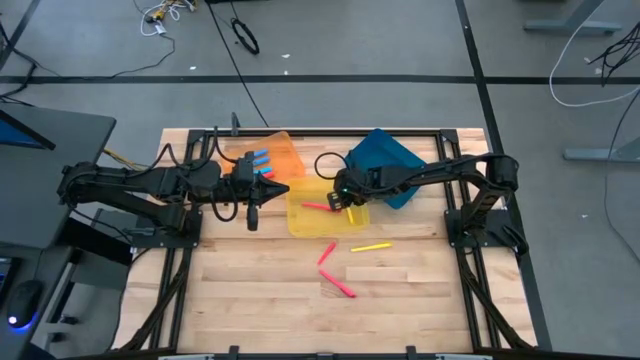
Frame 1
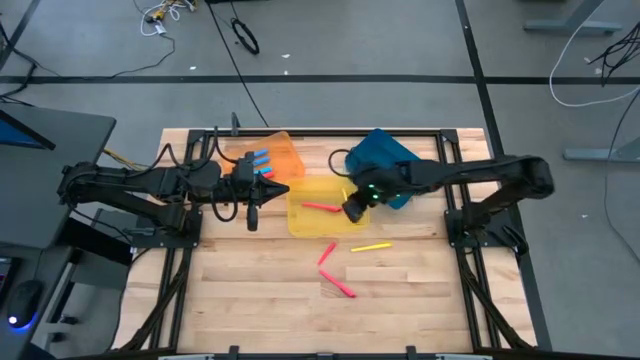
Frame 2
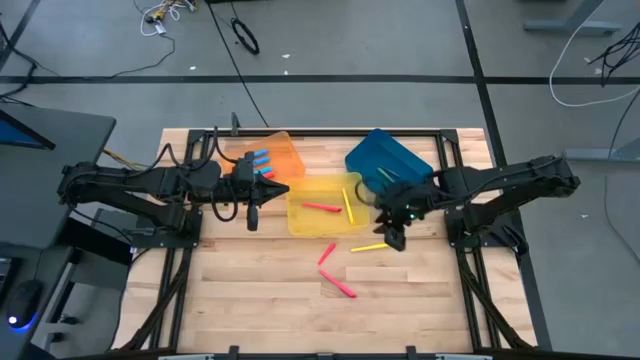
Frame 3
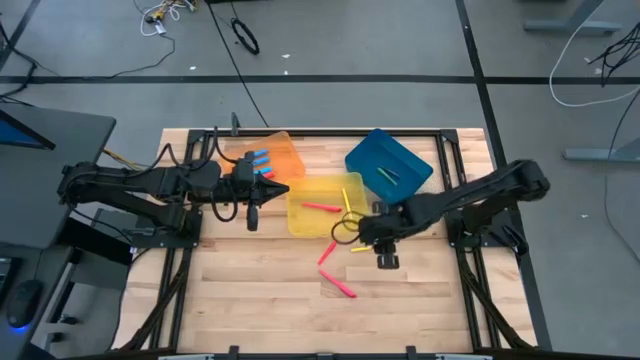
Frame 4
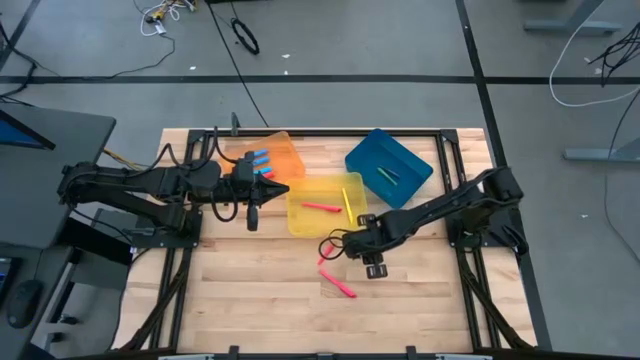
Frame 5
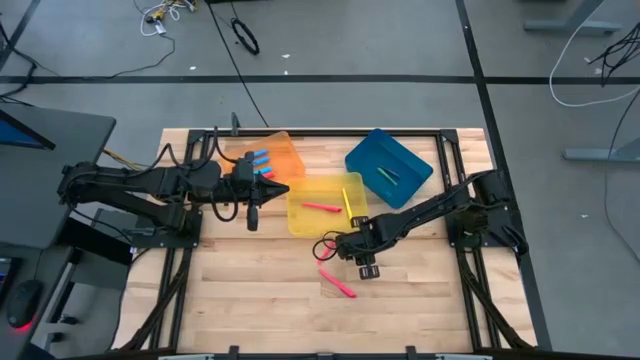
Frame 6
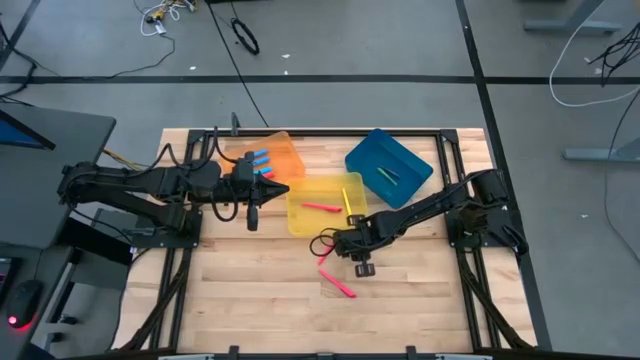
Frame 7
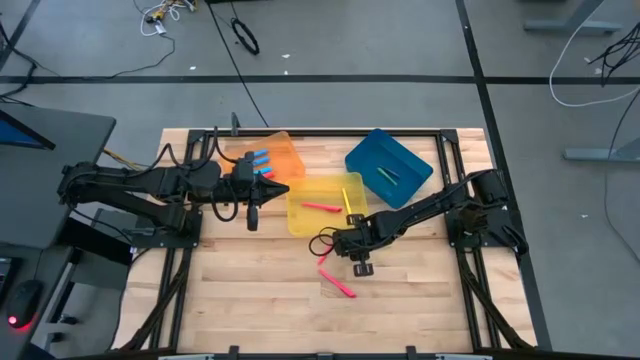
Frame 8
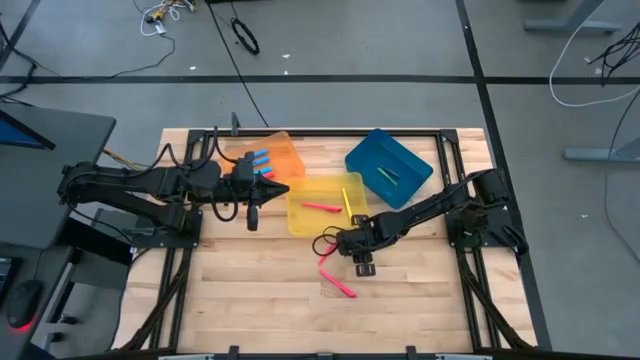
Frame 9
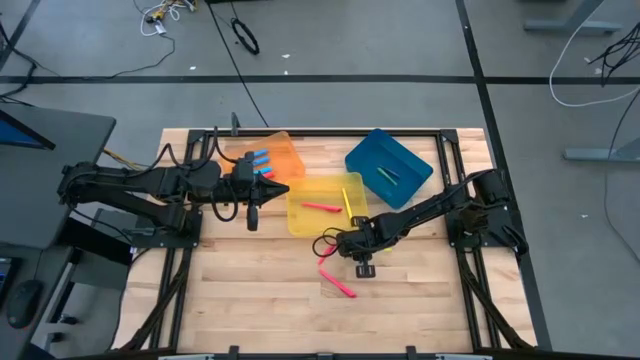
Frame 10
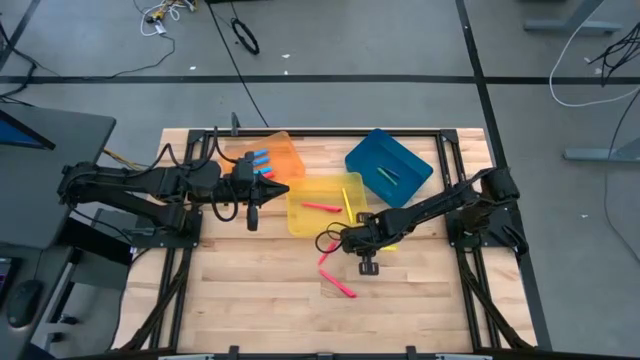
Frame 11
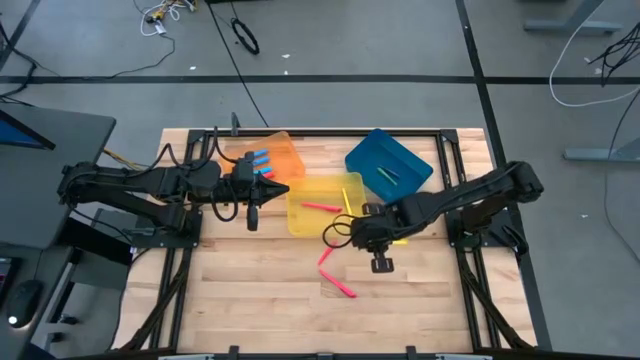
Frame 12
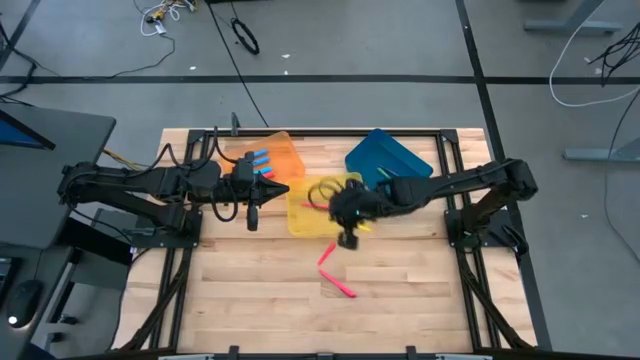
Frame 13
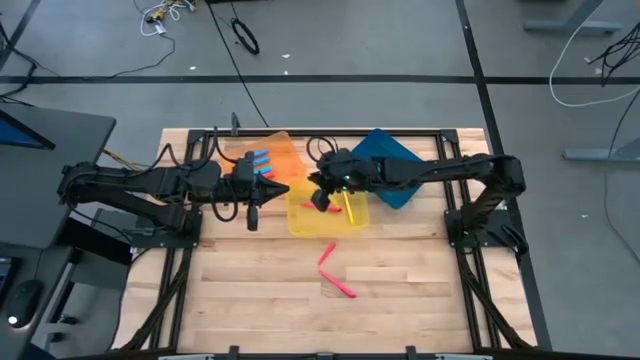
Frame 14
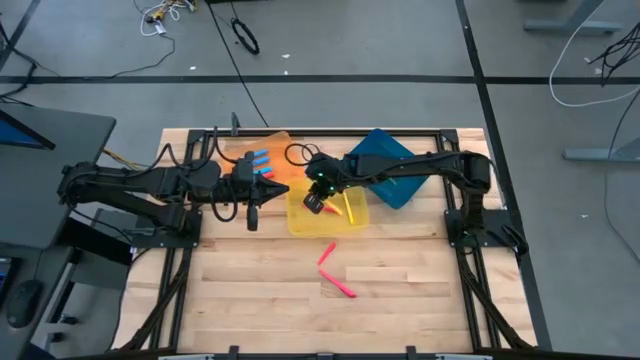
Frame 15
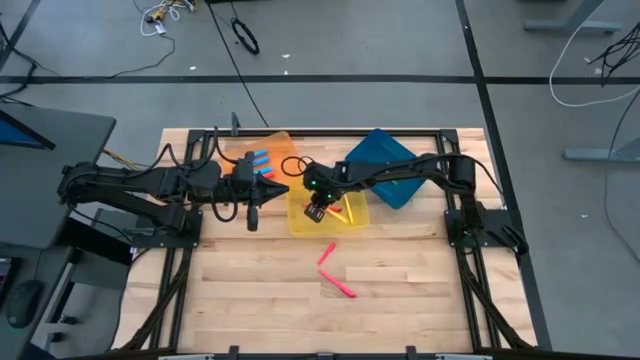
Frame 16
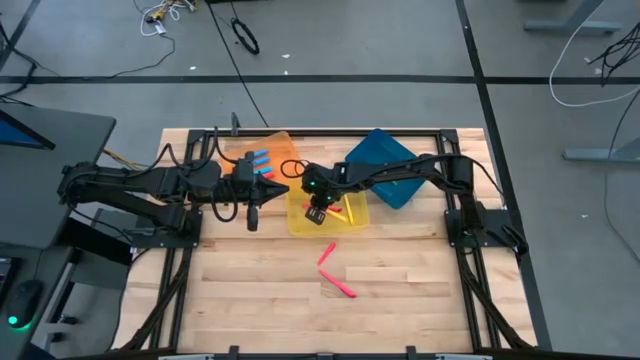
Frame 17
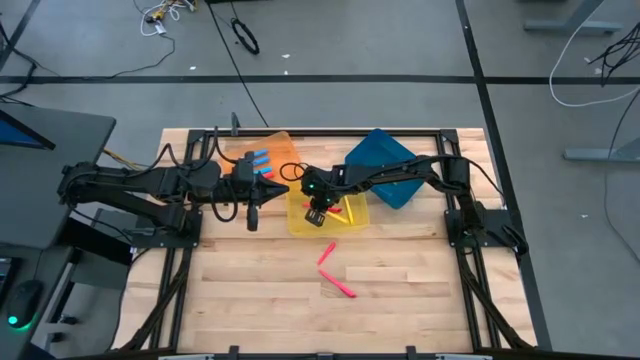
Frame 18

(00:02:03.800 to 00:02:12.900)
Task: Pick & Place Markers
Put the yellow marker pen into the yellow bin

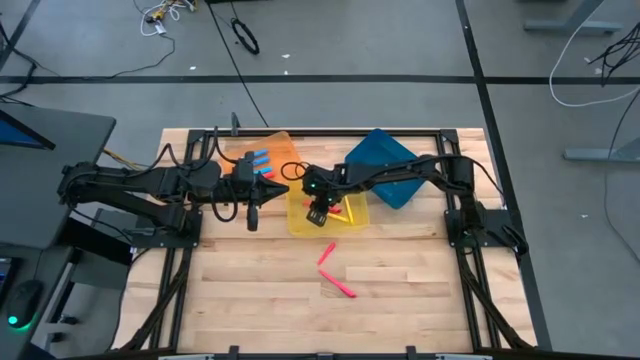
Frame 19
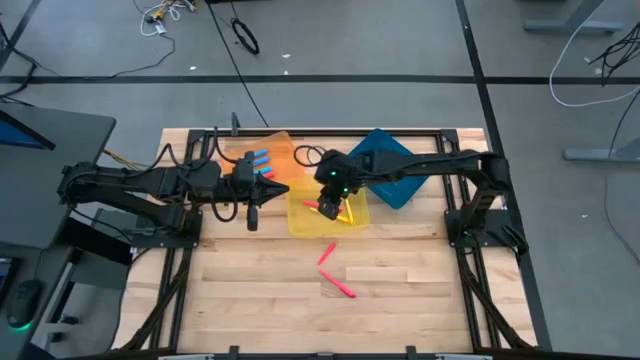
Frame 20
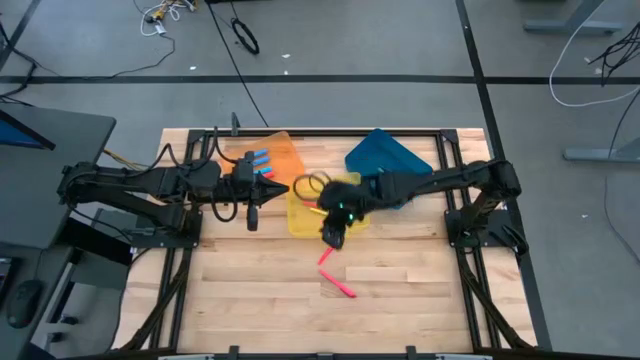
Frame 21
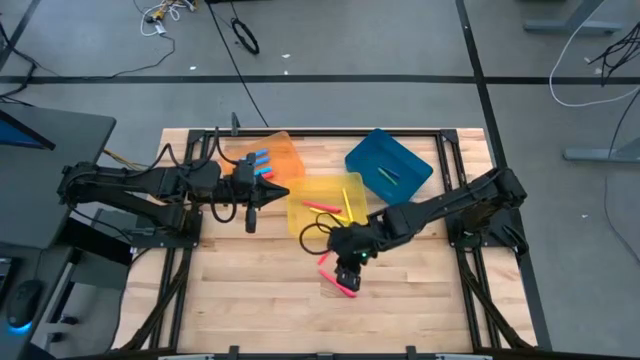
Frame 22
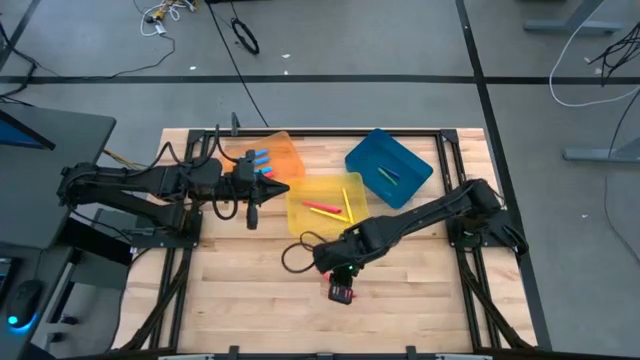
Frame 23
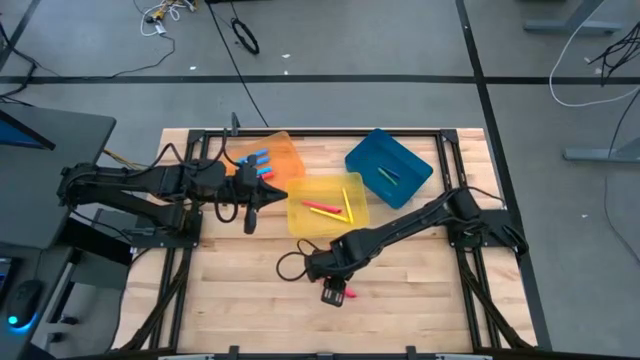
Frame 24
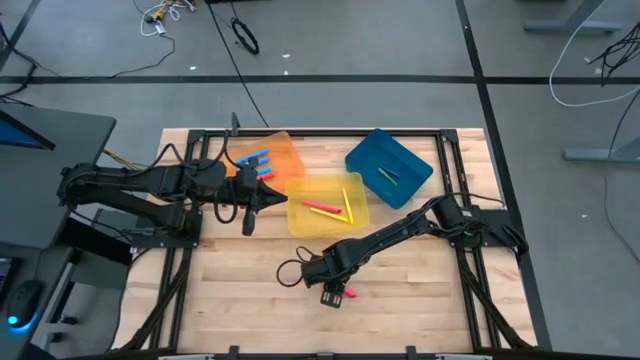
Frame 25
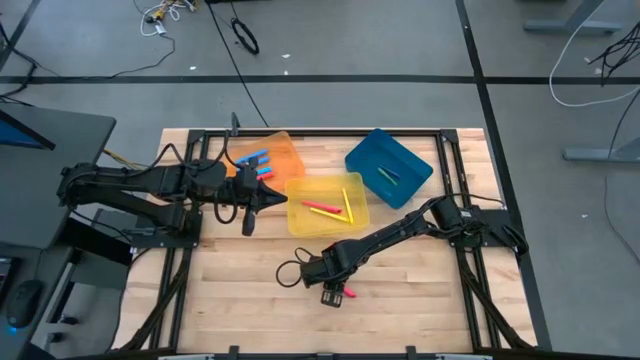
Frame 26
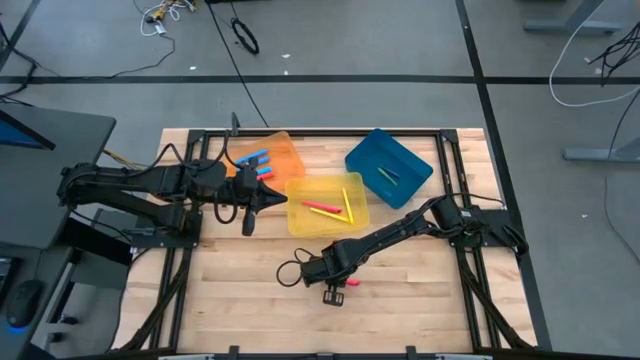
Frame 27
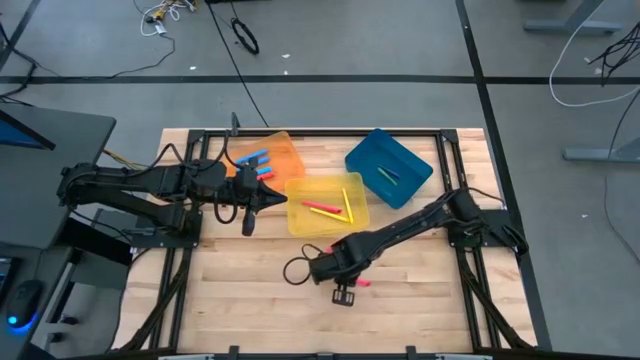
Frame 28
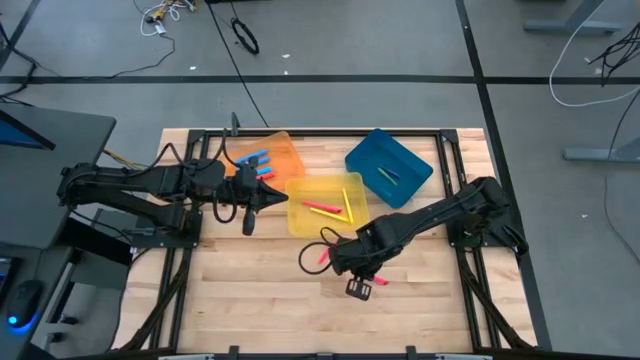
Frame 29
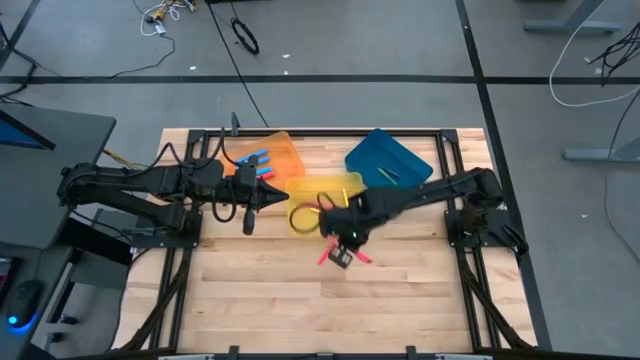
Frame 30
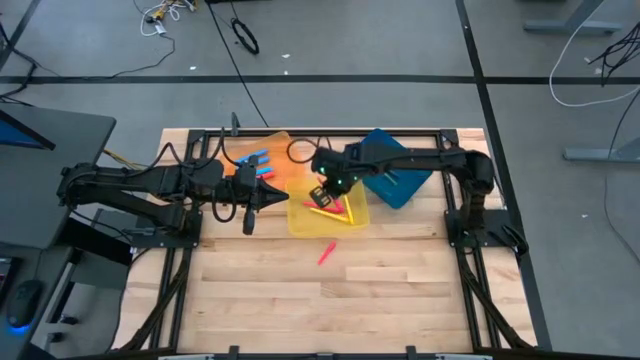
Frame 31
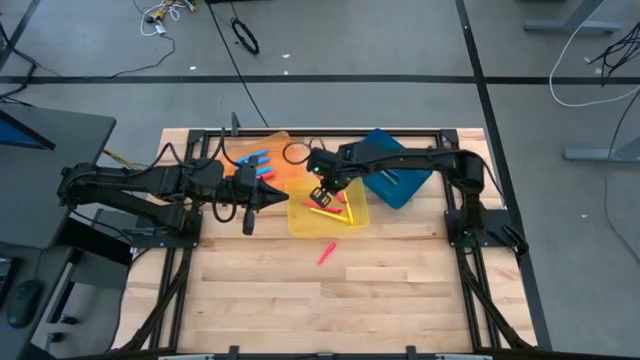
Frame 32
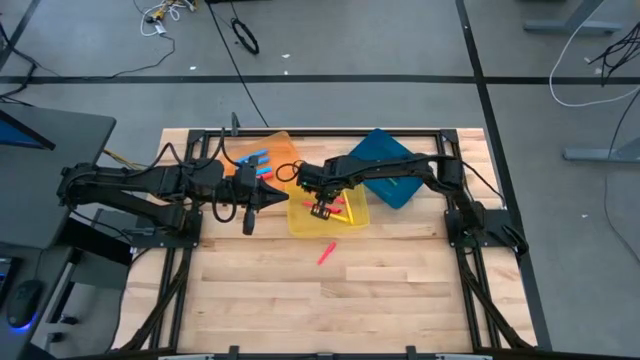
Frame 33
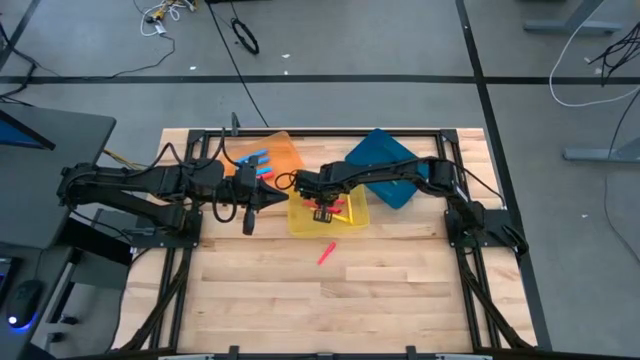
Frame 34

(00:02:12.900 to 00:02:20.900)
Put the pink marker pen into the yellow bin
